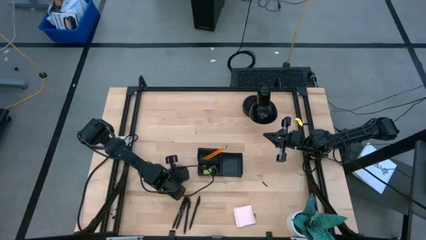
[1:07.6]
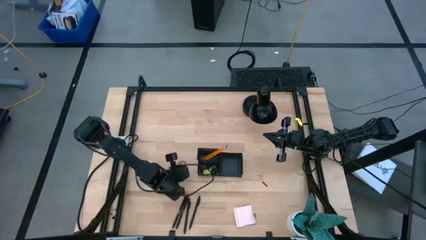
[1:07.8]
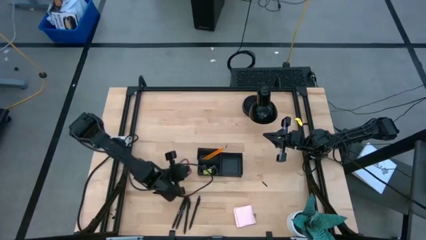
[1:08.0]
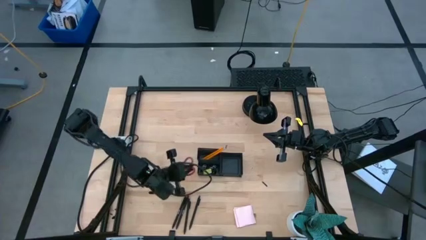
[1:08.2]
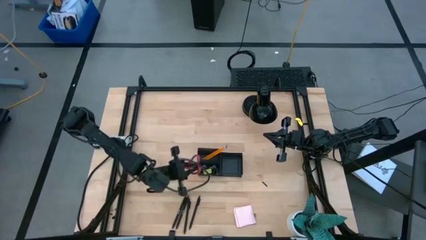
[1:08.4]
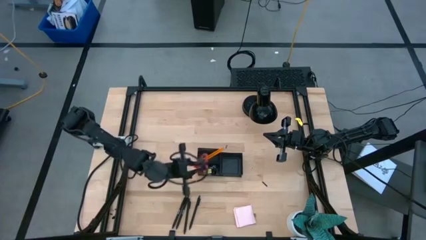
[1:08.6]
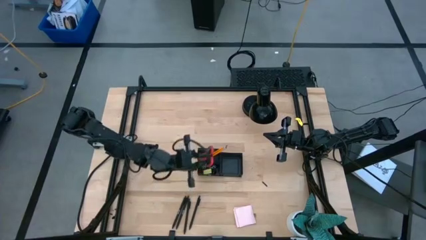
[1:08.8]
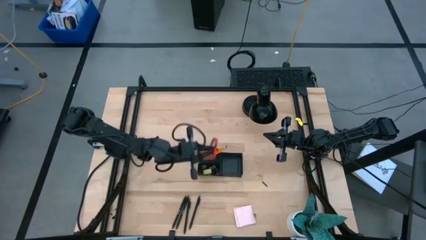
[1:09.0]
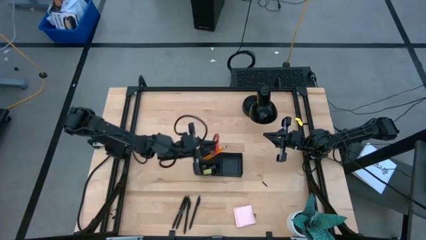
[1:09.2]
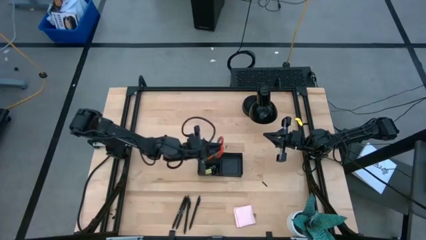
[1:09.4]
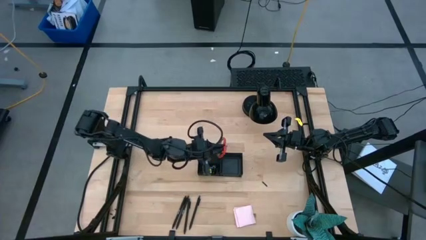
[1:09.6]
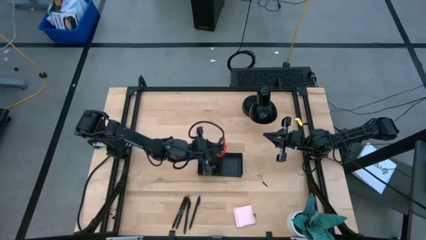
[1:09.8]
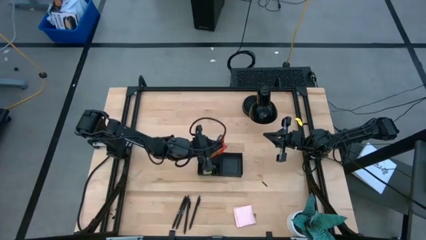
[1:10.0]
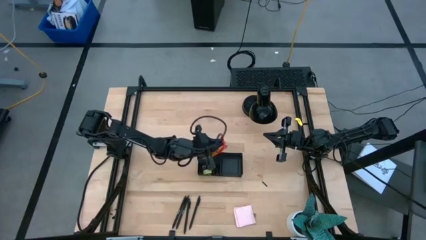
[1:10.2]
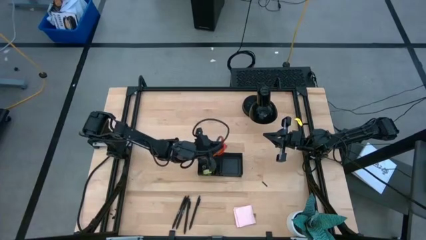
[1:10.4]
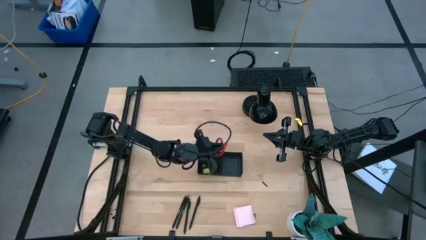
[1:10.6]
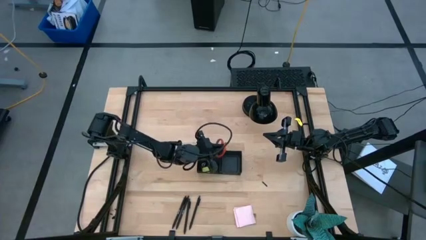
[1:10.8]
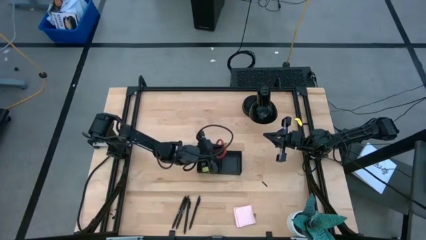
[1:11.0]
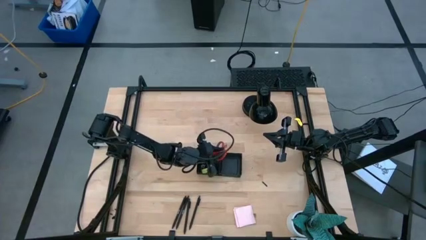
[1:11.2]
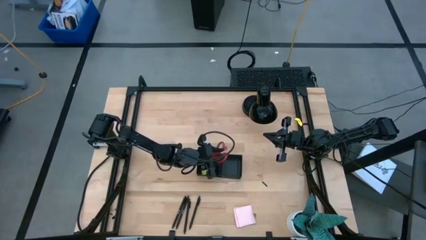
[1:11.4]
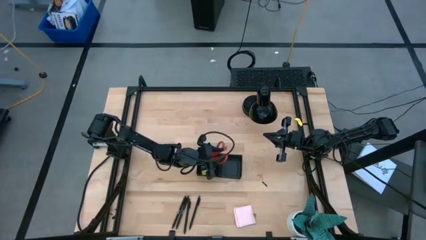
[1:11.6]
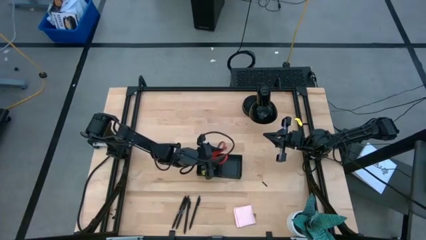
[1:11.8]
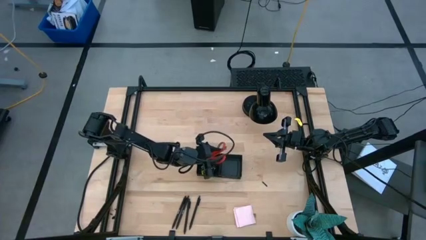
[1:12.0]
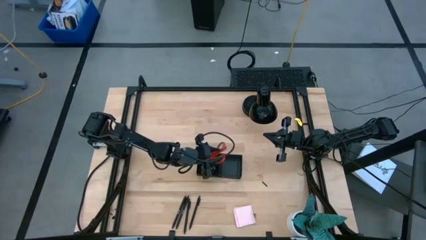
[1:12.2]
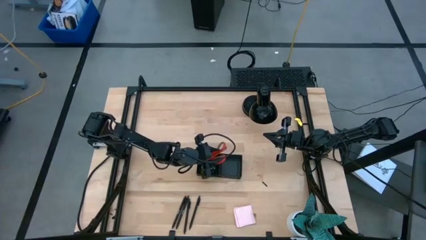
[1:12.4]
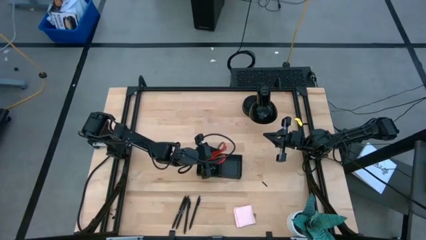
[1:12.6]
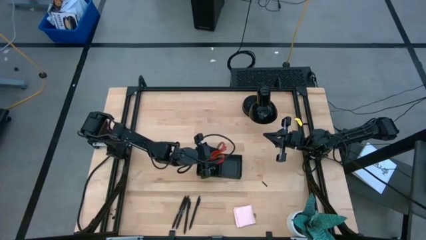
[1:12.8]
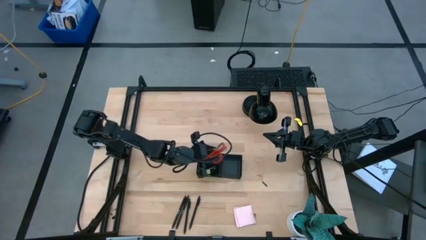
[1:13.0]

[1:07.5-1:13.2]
Task: Pick and place office supplies into organizer
Put the red scissors into the black desk organizer

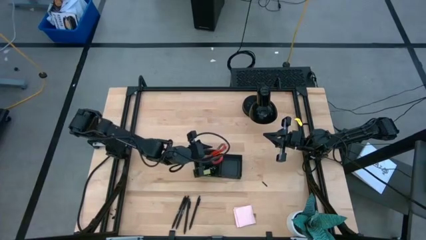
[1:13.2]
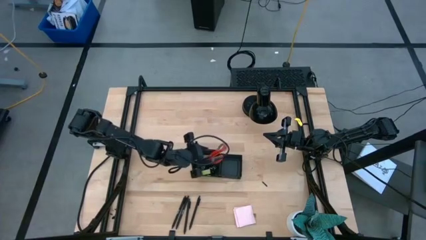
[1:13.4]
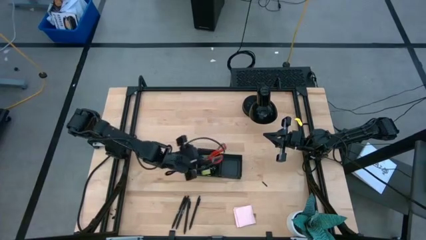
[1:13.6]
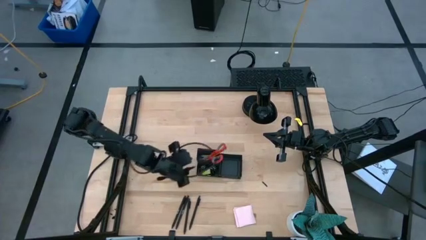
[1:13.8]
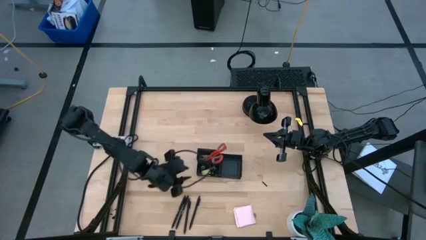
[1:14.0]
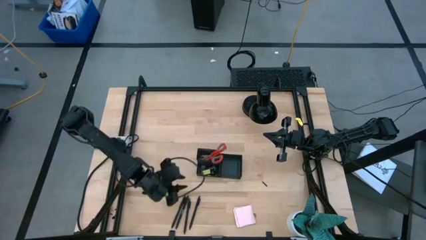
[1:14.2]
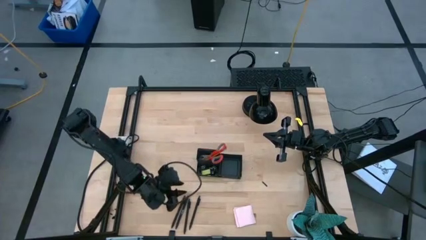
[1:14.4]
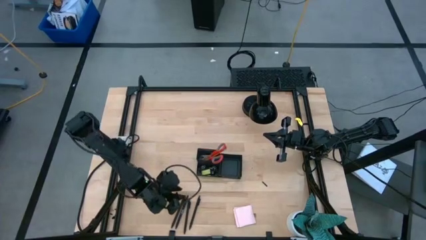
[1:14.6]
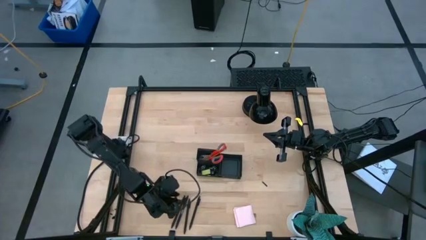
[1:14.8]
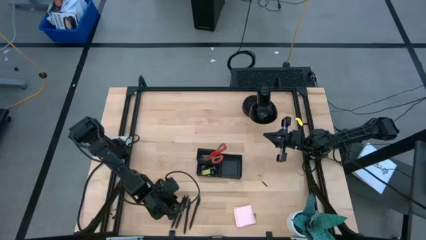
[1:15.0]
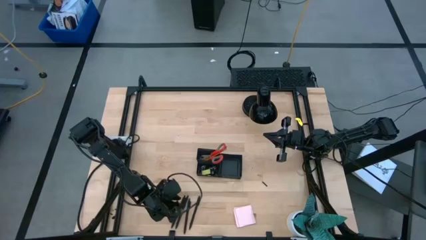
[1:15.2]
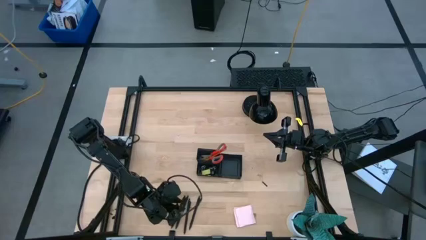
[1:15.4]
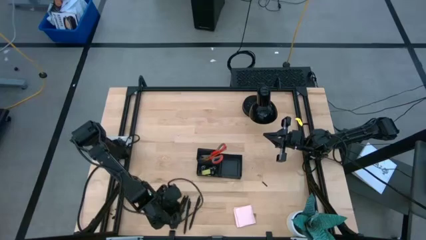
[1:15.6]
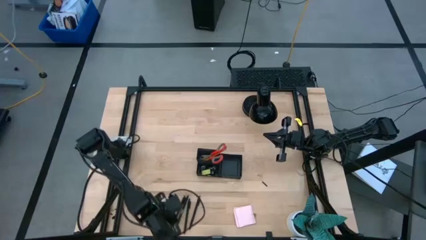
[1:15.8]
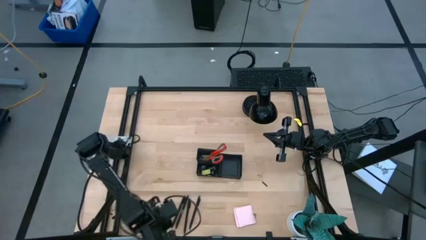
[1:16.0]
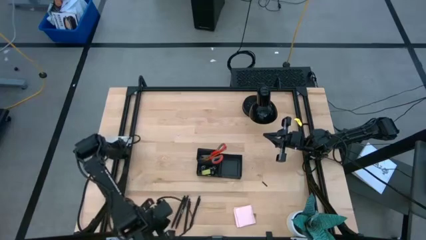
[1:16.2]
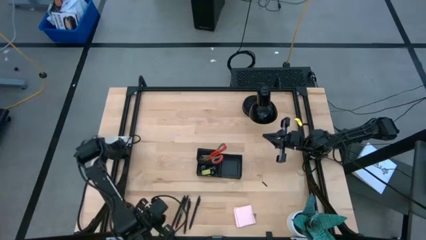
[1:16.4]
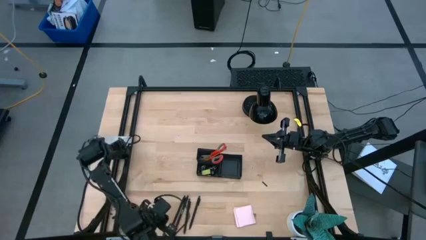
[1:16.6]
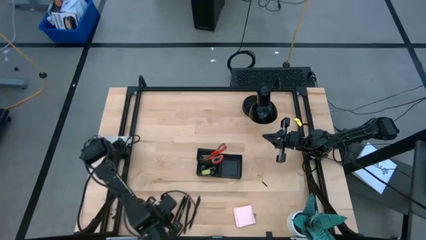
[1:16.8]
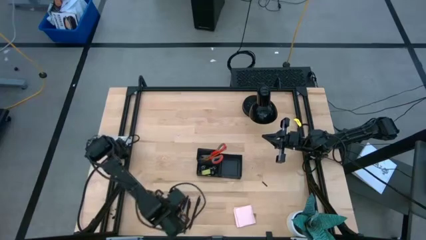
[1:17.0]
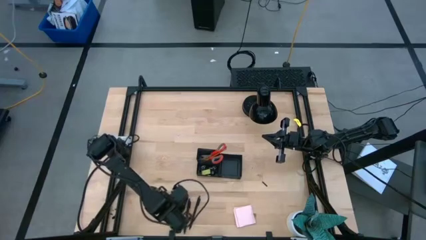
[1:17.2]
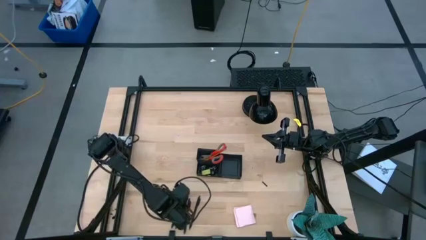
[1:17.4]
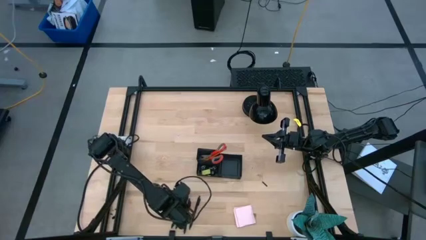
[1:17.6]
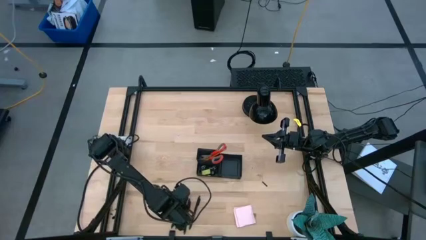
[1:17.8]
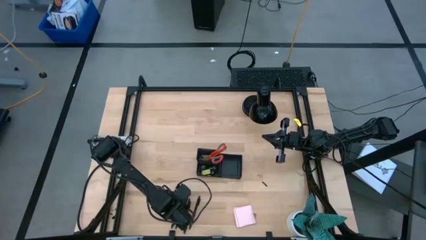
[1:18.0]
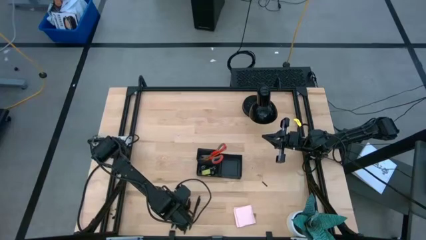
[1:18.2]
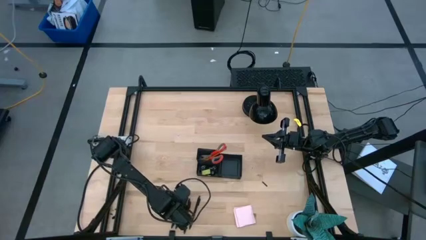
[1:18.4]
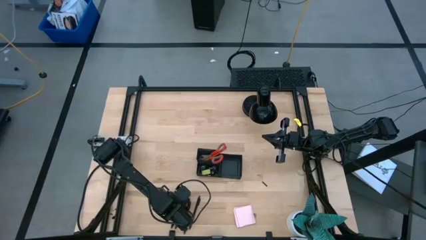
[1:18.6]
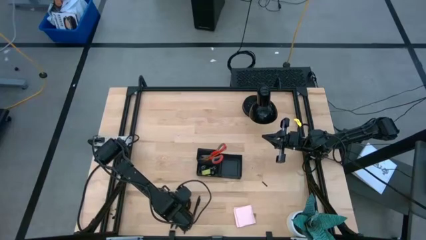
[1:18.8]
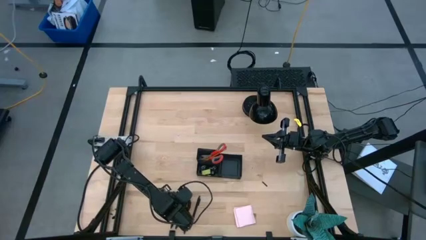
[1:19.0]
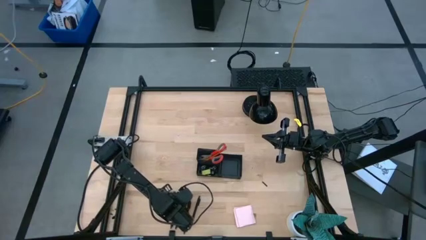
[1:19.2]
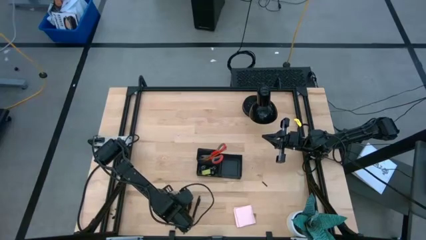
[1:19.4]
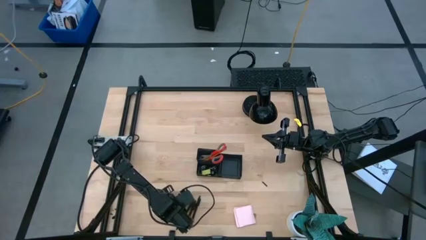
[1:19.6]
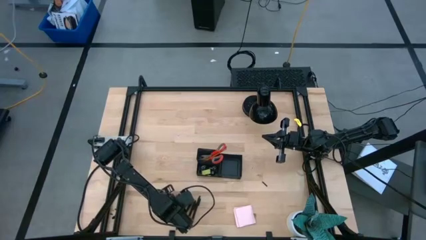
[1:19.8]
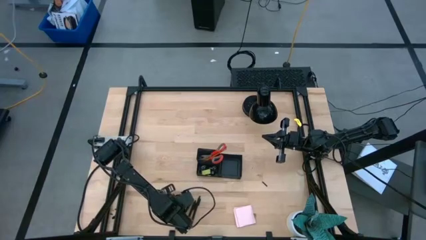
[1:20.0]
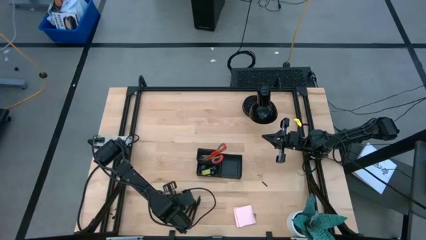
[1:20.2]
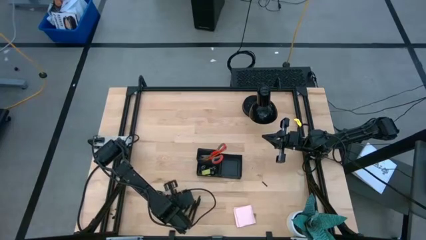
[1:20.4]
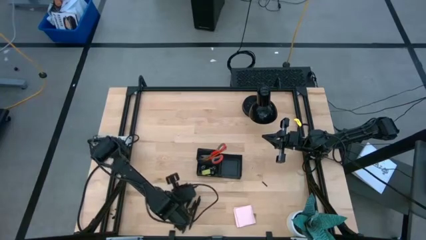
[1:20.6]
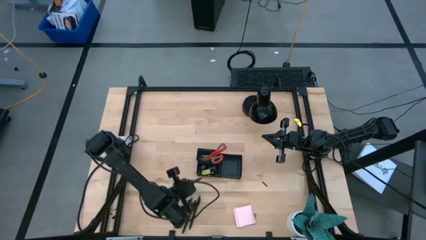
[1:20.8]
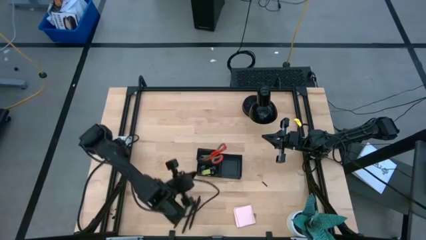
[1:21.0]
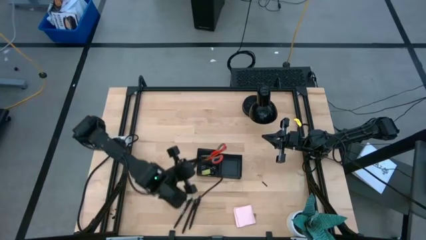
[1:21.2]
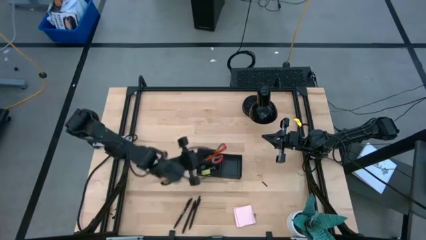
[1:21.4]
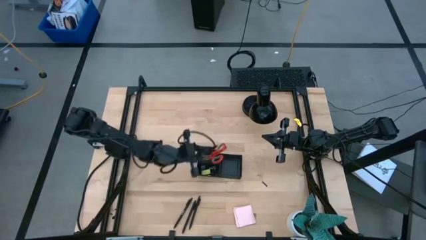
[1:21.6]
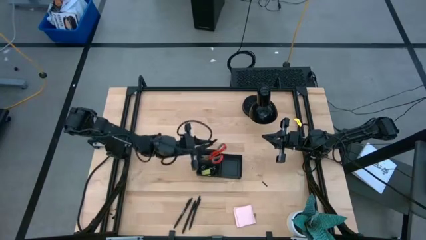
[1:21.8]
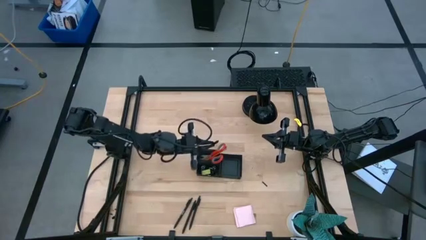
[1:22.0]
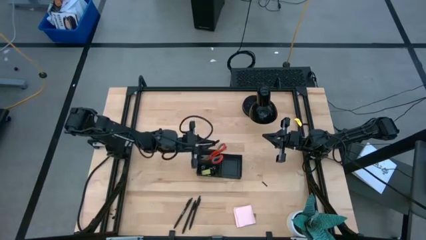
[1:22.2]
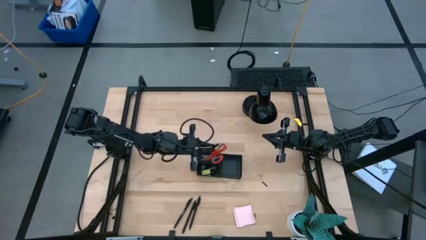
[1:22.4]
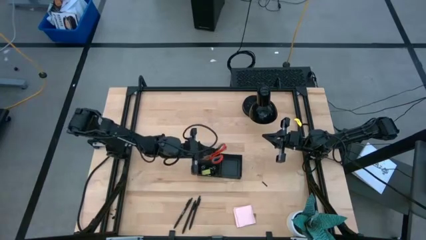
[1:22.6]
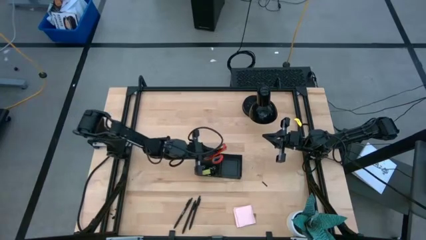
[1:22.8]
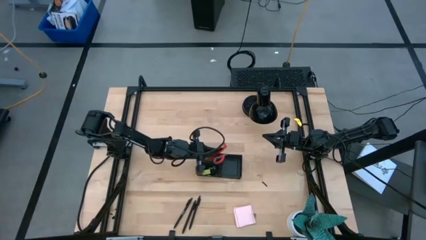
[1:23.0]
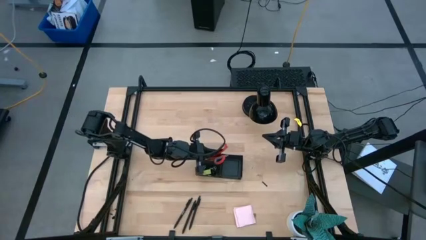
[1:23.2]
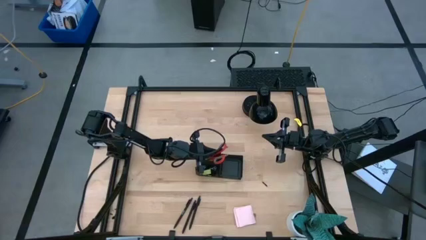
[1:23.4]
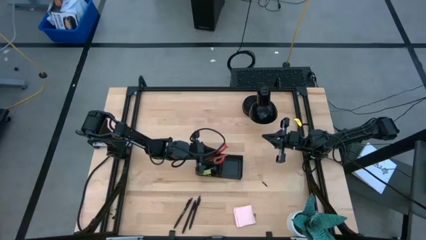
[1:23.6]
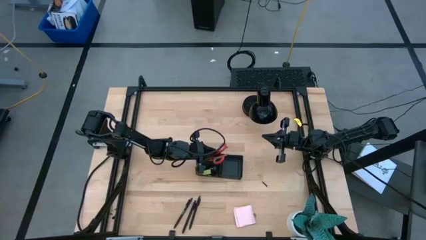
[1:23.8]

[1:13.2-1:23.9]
Put the black pen into the black desk organizer
